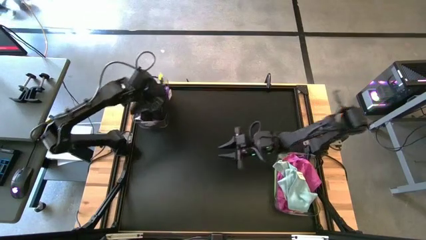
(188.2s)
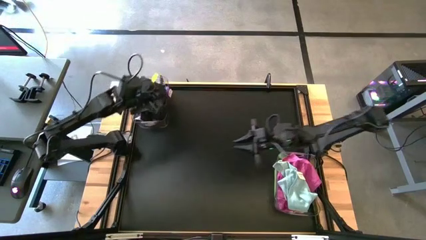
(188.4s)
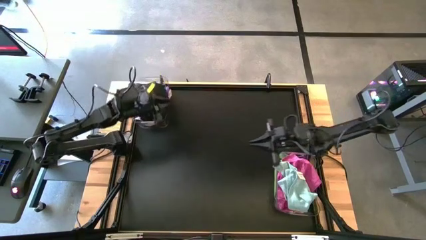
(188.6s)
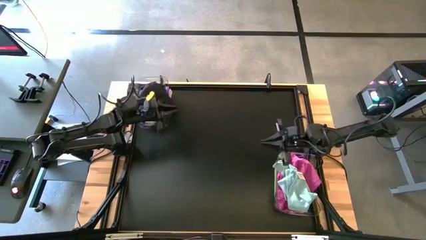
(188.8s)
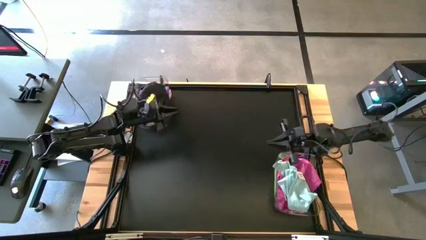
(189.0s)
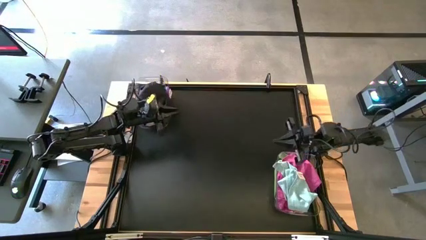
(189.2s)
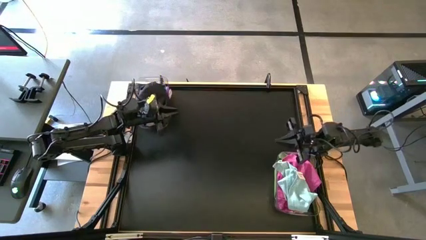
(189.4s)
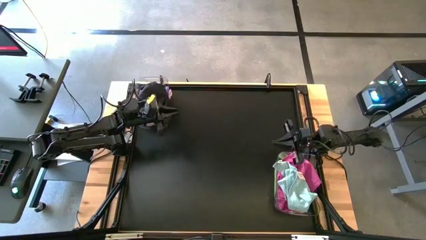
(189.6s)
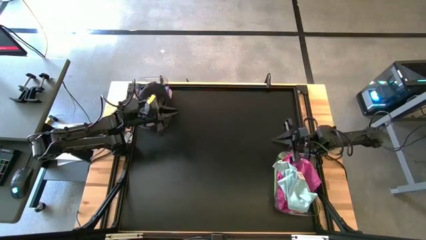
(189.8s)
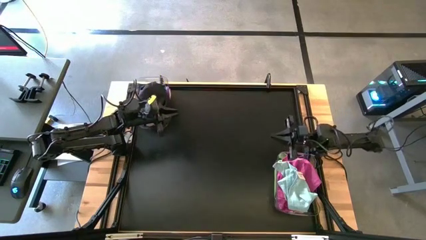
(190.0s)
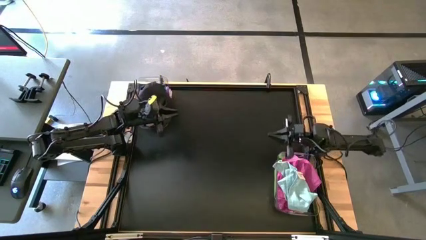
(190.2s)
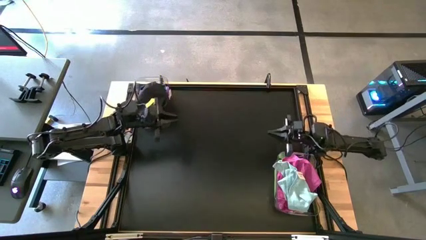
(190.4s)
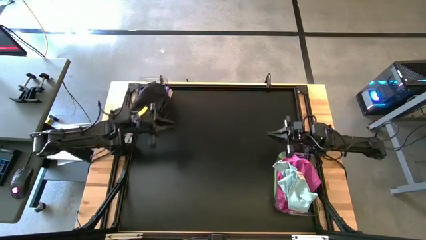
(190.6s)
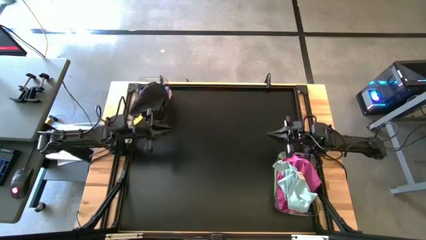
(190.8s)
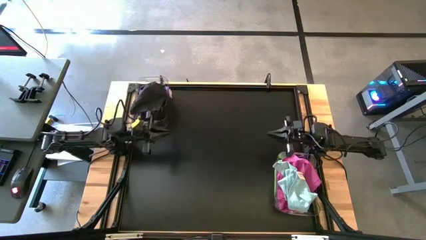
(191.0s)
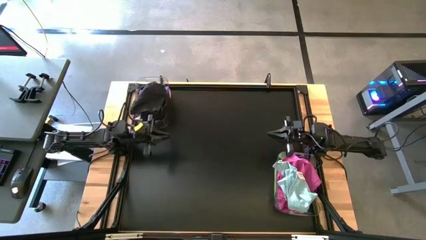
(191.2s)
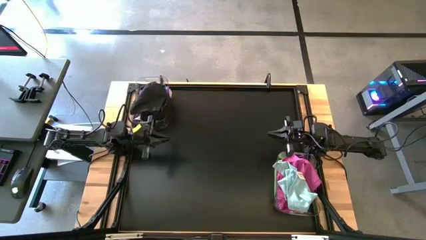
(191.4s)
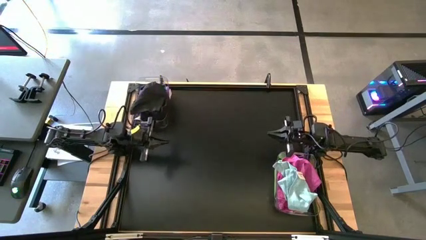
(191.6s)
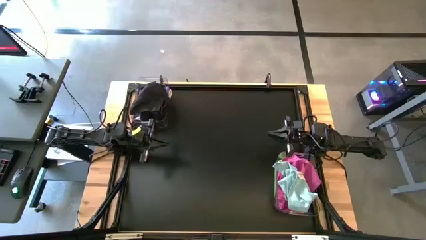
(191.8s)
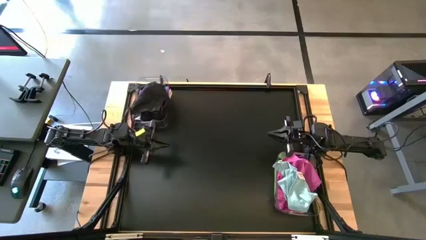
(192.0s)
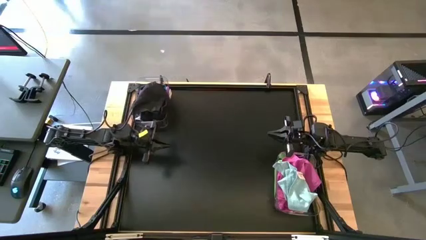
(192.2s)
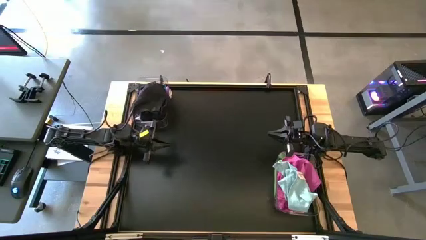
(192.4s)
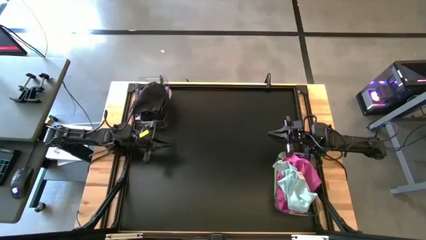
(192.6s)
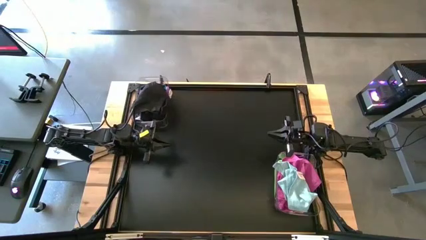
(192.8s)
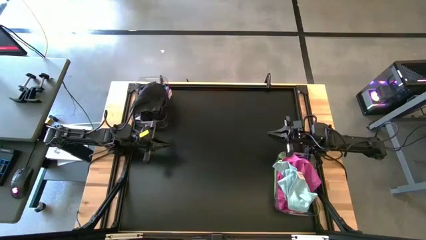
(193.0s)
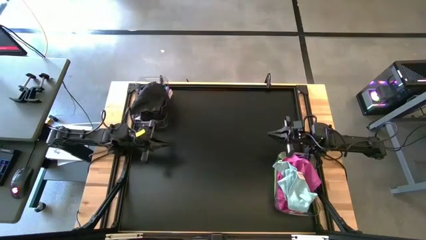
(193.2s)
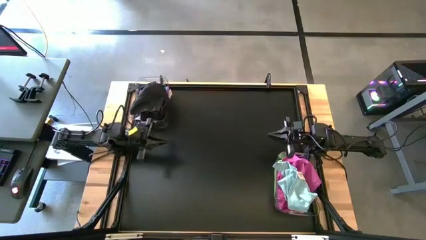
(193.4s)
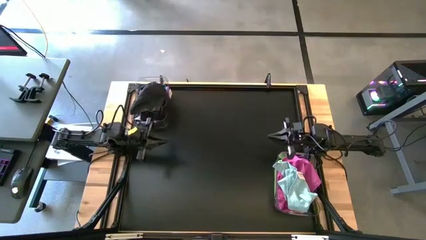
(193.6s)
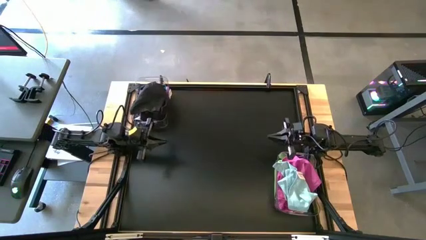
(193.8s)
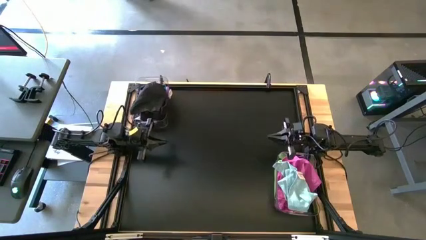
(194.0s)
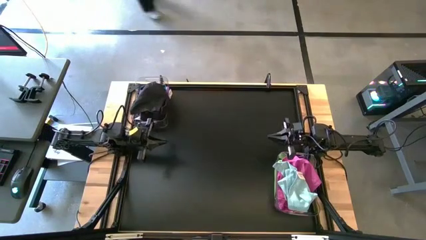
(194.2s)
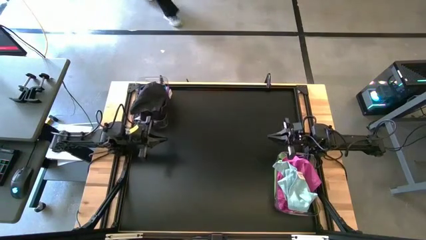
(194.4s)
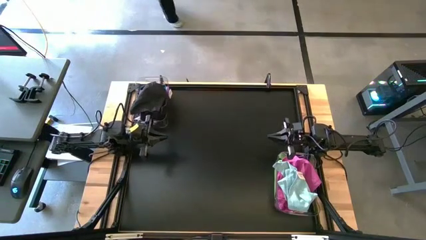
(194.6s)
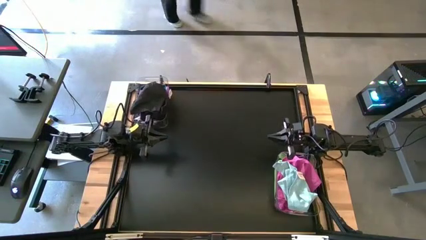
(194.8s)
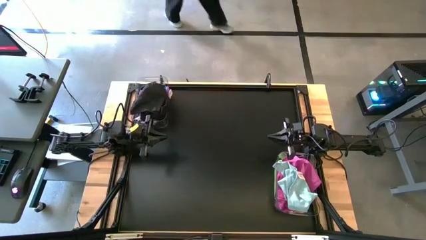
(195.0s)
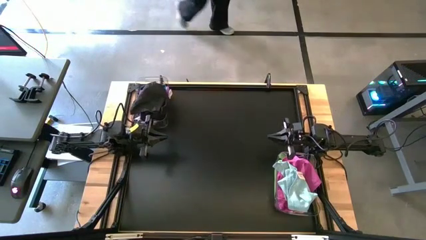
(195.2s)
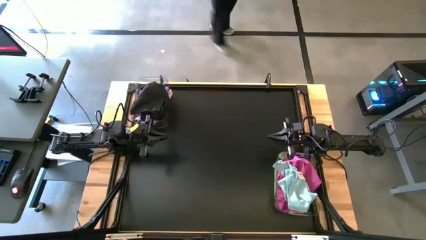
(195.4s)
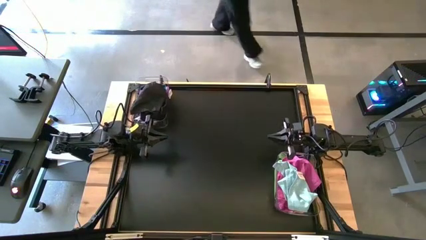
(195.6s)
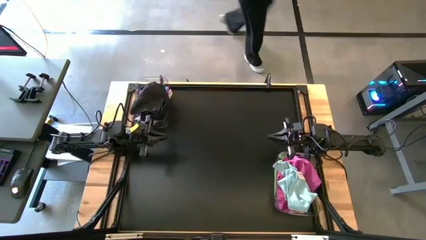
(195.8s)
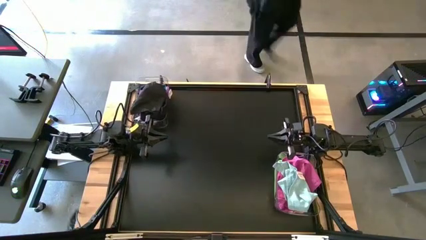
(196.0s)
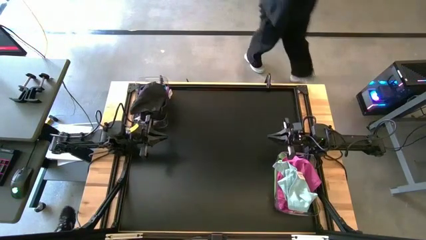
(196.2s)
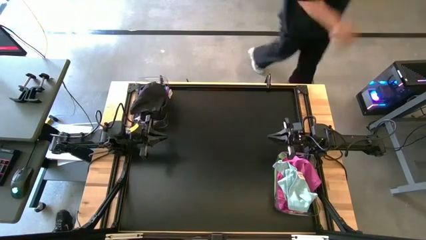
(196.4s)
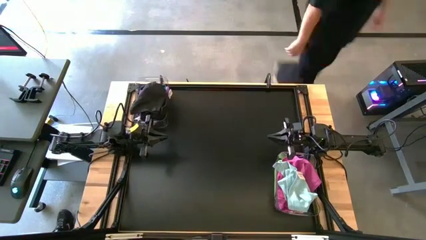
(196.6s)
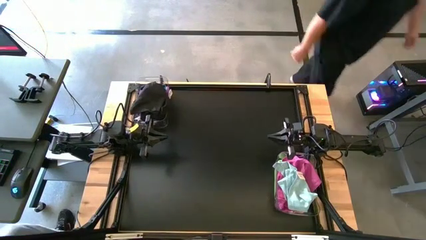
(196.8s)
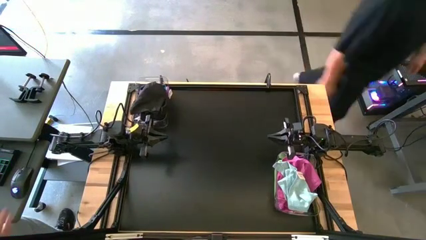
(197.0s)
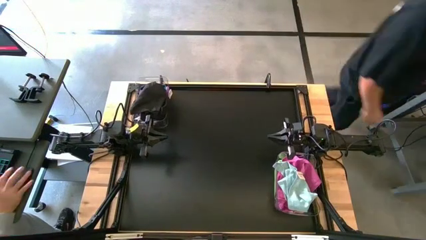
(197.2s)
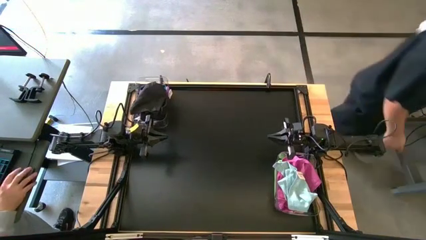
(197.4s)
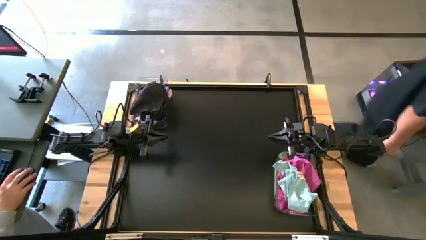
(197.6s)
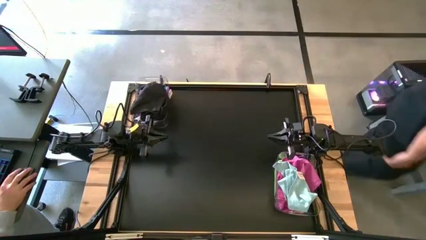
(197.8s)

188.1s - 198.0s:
Task: Sort towels by color in basket
Return to Home Position

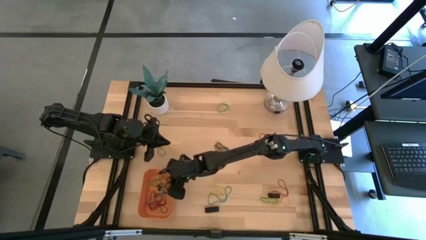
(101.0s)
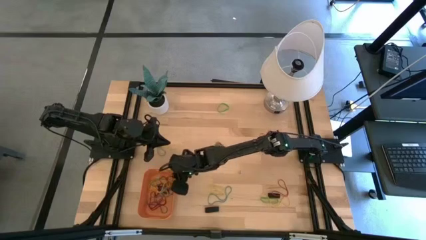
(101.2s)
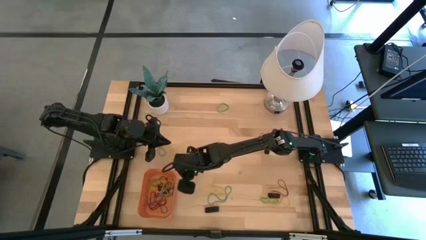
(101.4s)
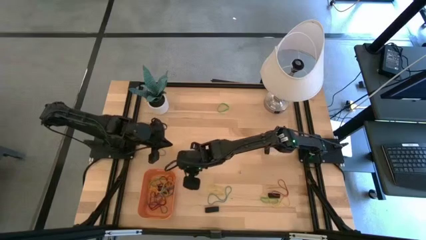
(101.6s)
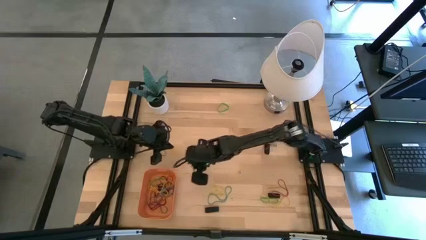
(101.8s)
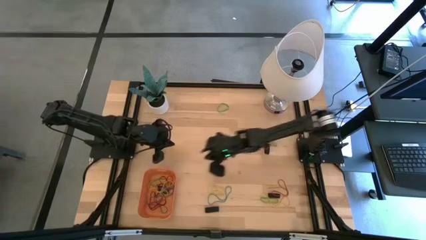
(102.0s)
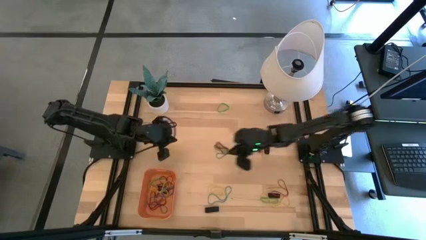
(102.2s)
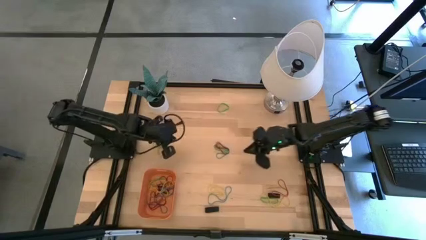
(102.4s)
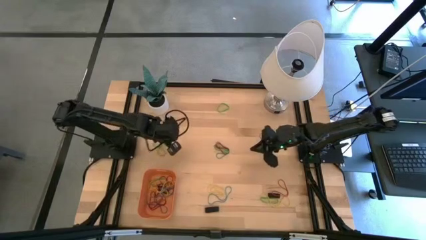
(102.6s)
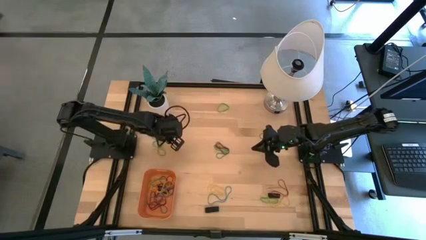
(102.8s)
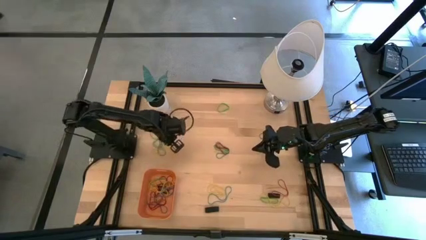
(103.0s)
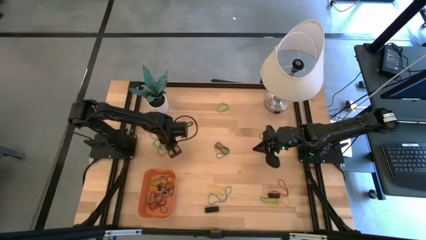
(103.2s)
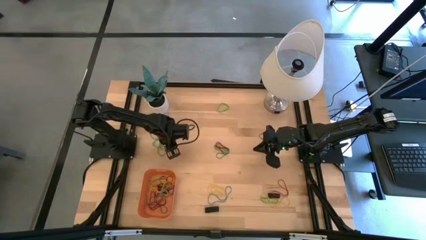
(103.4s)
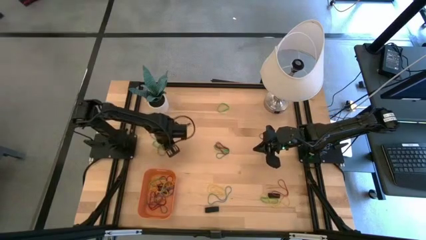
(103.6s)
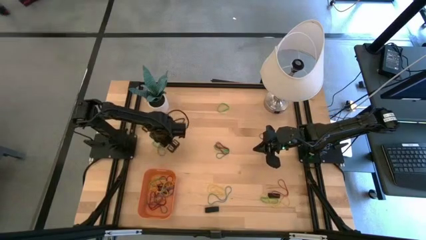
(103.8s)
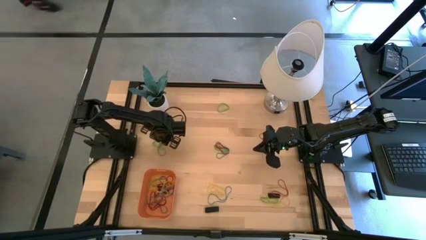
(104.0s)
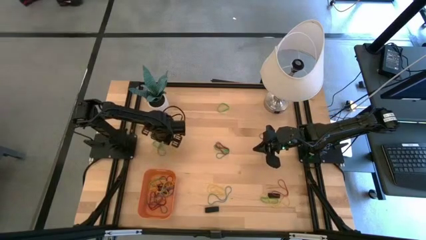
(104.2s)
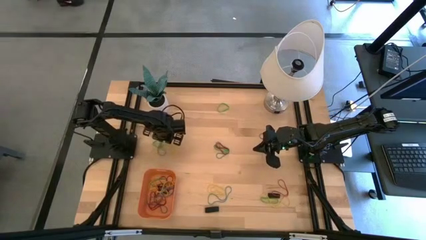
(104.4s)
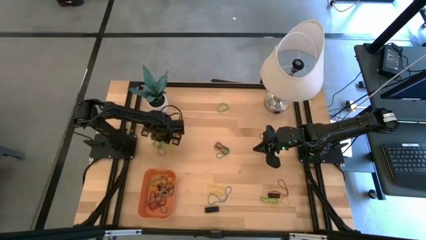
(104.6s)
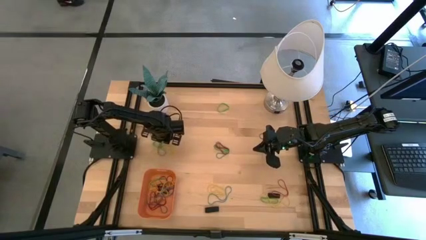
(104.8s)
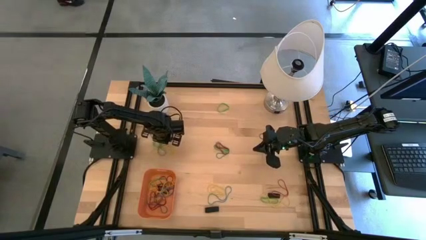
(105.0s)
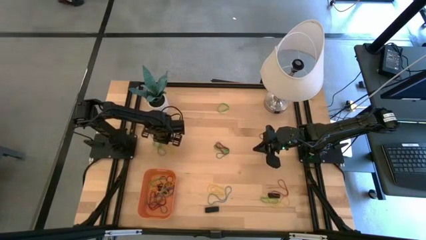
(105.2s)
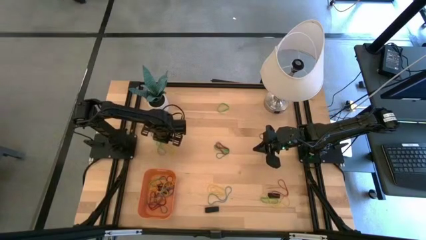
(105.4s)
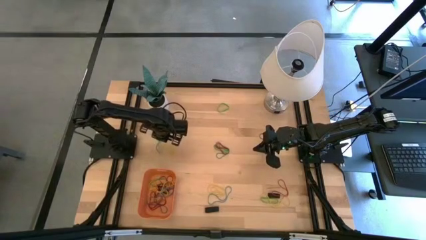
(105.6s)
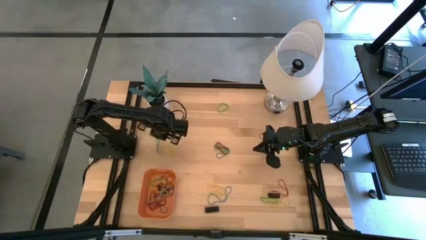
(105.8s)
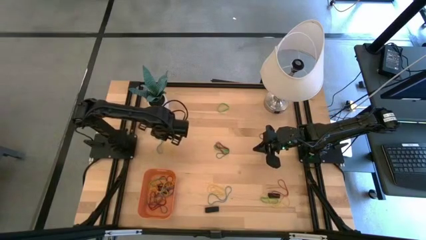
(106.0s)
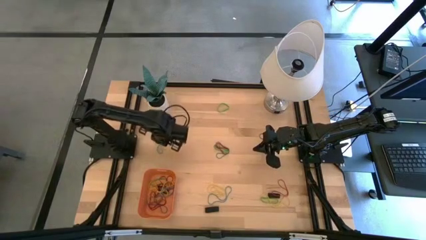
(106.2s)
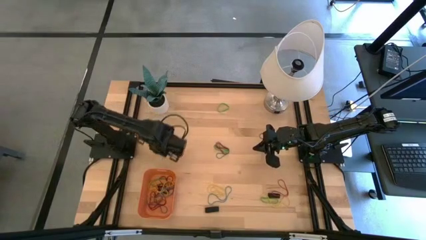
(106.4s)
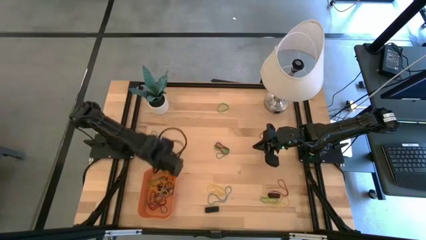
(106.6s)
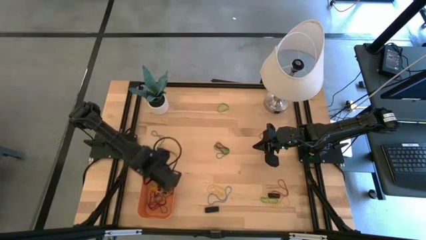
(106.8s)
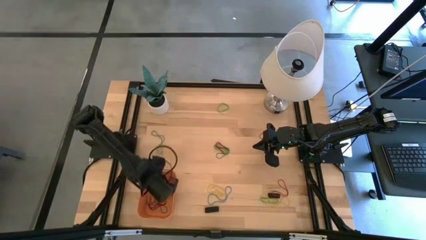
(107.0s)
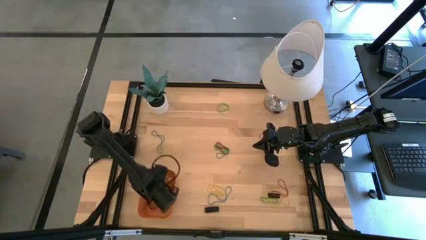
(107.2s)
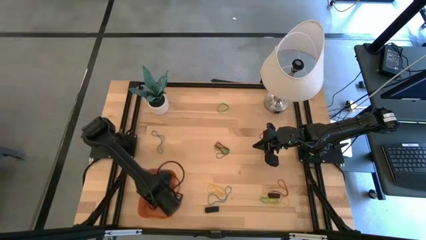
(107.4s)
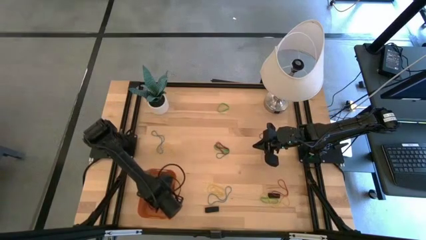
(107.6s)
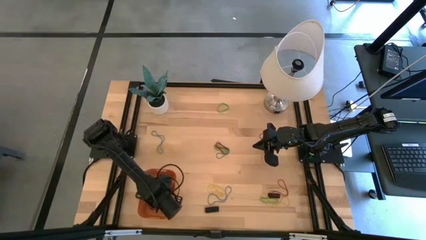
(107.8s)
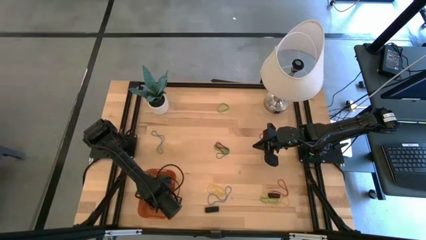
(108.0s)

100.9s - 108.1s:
Task: Pick and place rubber bands into bin
Put the green rubber band into the orange bin
